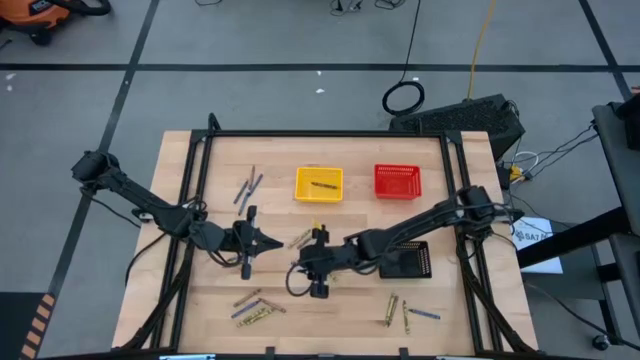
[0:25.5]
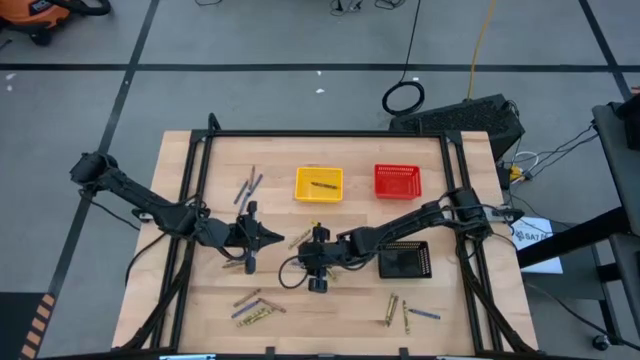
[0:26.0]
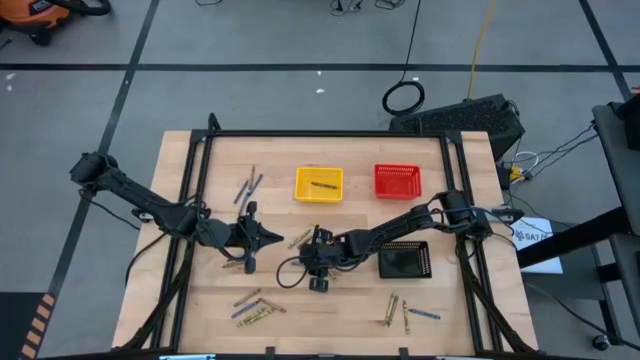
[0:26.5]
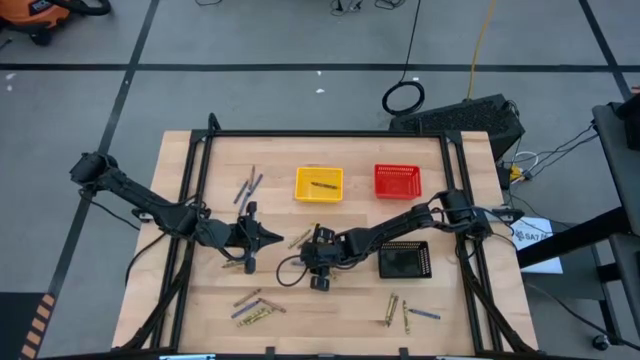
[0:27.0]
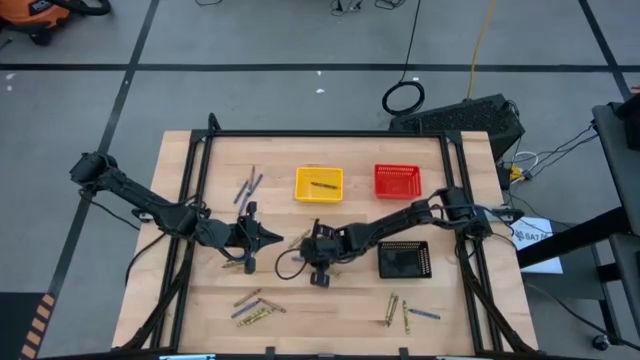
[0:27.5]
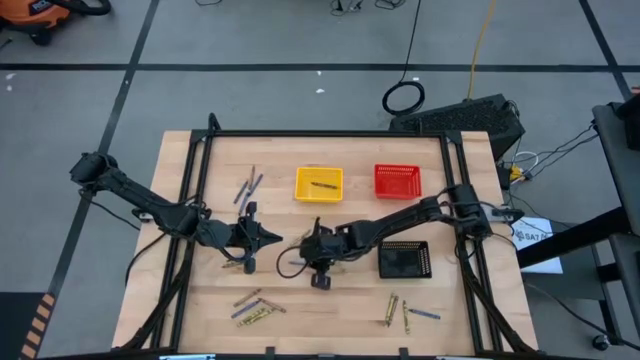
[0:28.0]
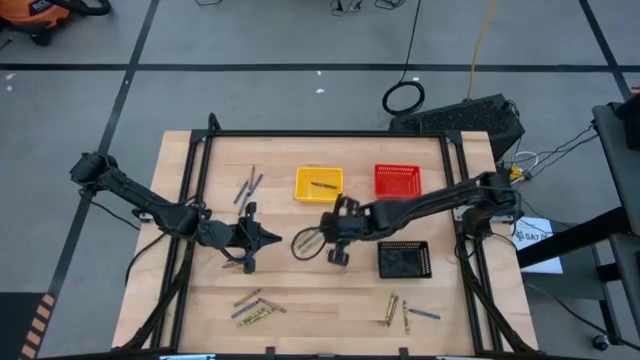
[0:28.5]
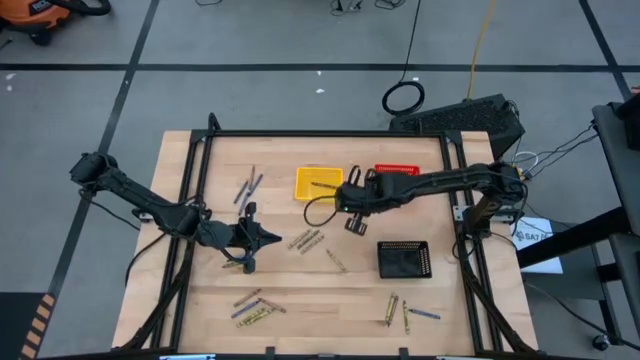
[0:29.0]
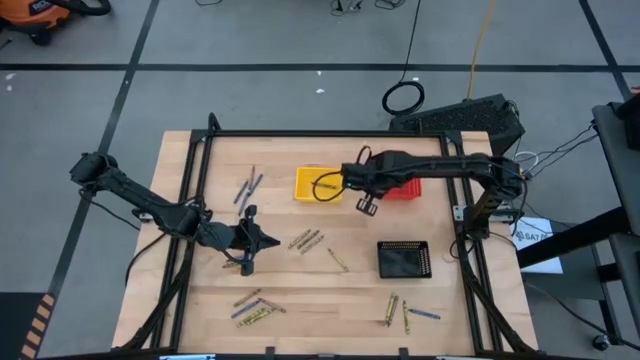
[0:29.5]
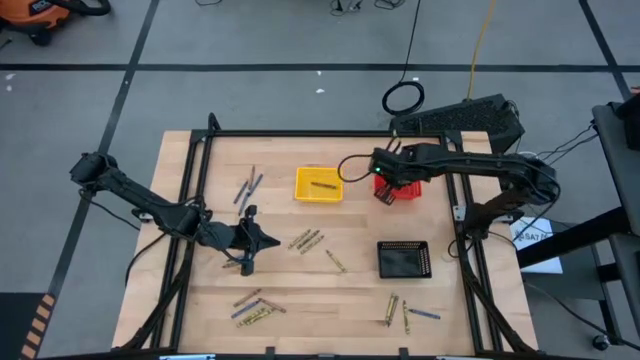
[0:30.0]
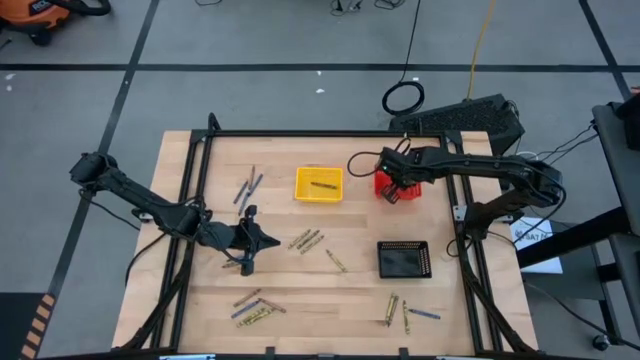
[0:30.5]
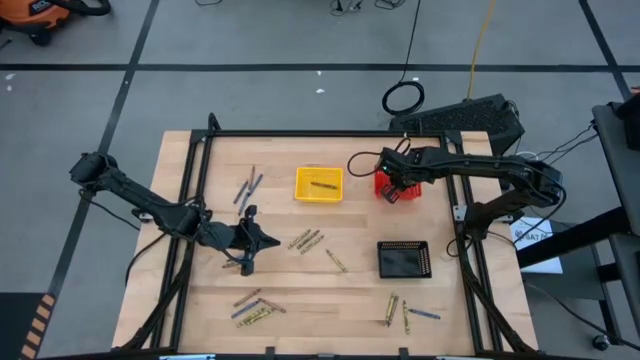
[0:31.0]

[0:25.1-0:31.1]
Task: Sort crayons
Put the blue crayon into the red bin

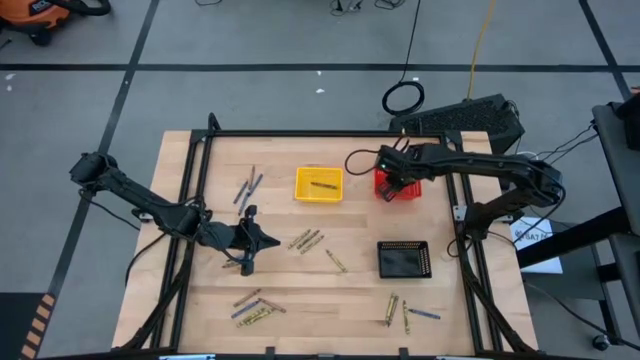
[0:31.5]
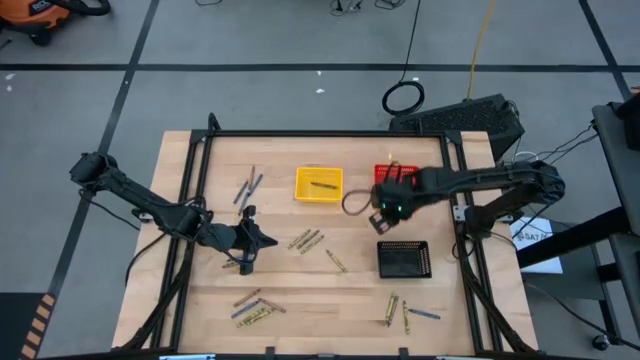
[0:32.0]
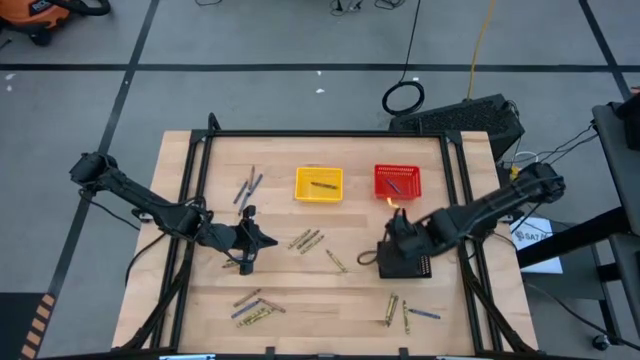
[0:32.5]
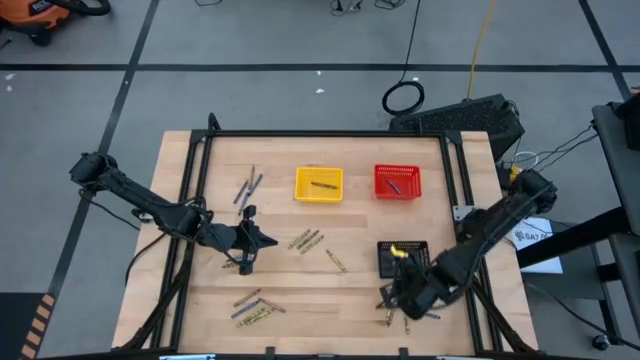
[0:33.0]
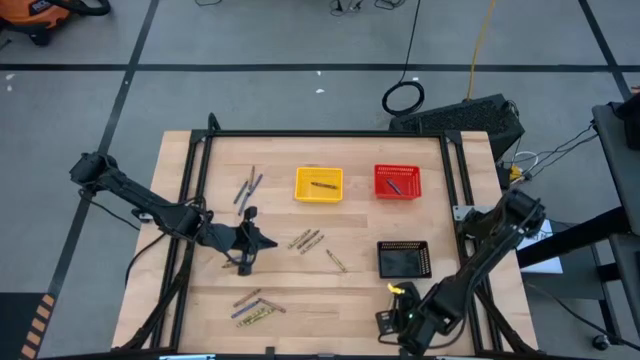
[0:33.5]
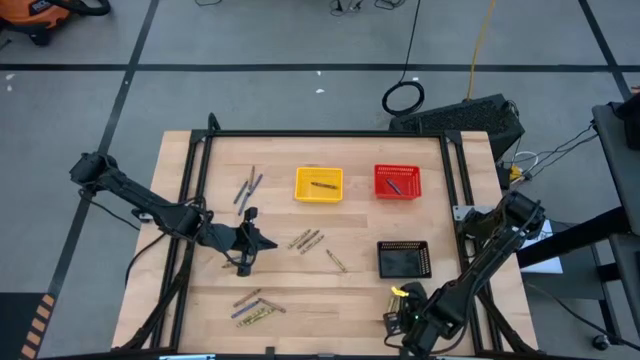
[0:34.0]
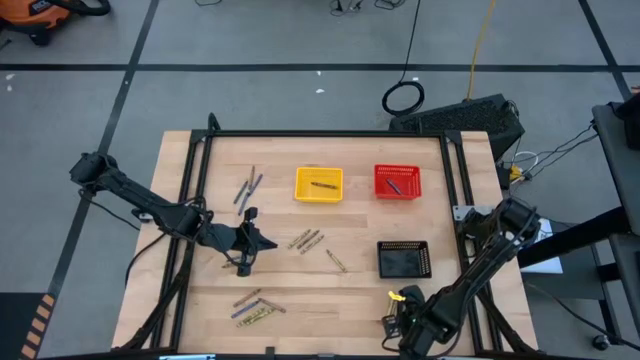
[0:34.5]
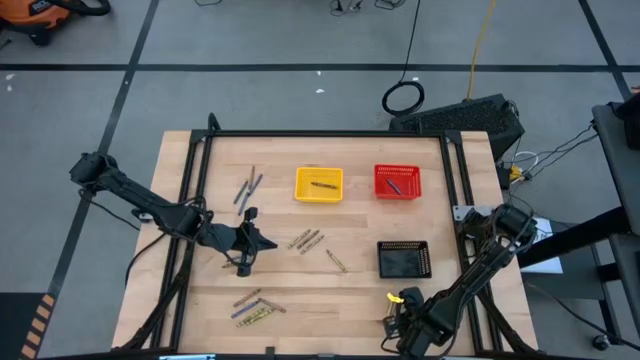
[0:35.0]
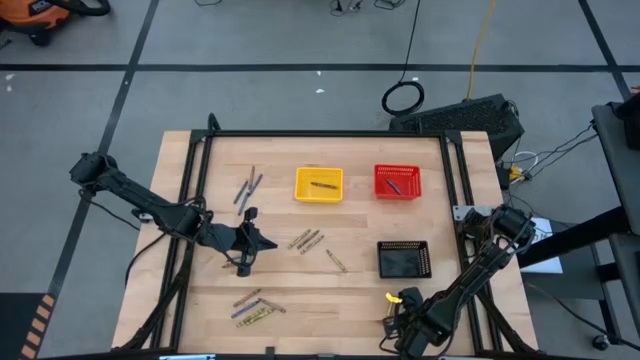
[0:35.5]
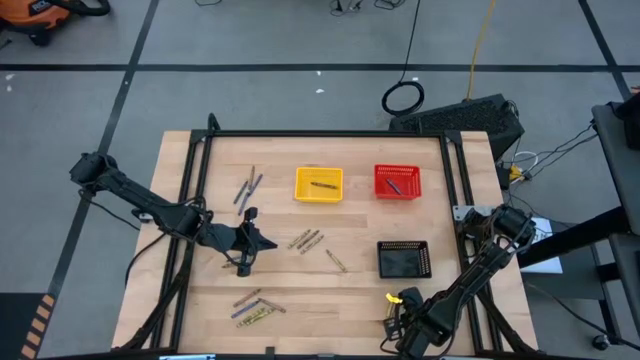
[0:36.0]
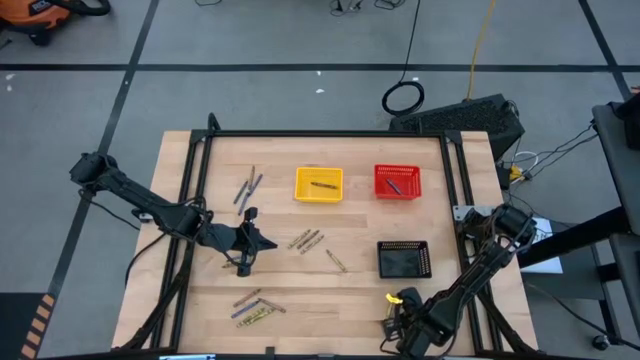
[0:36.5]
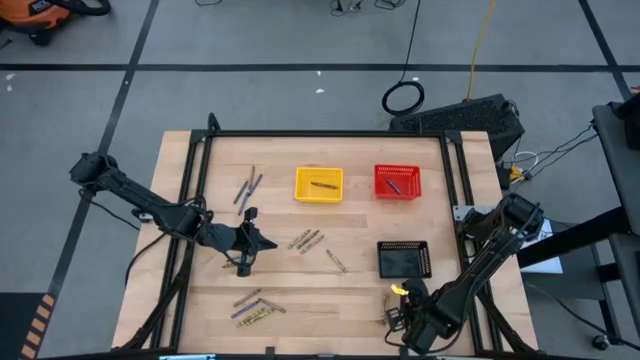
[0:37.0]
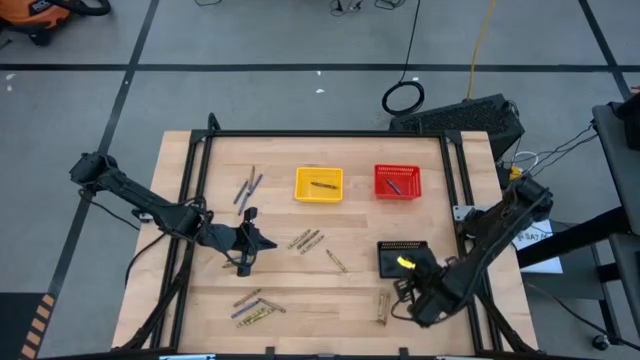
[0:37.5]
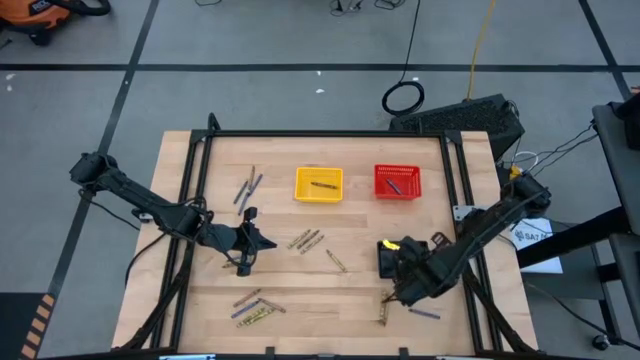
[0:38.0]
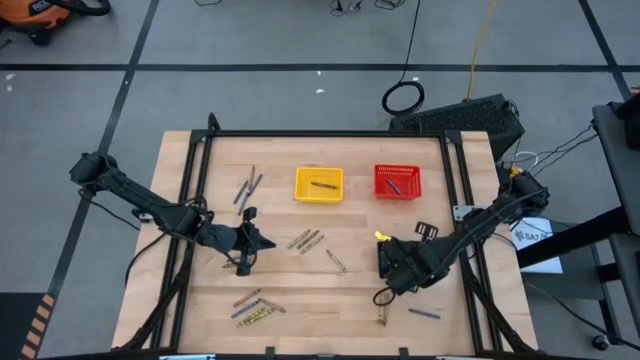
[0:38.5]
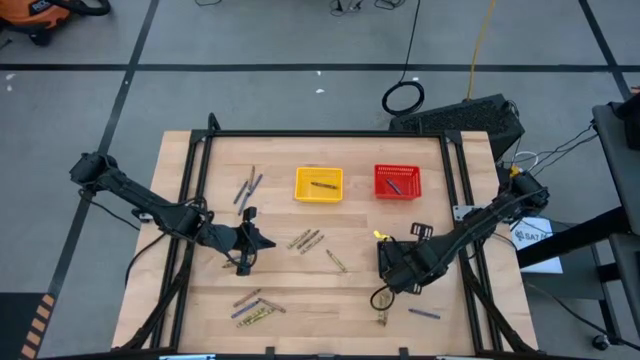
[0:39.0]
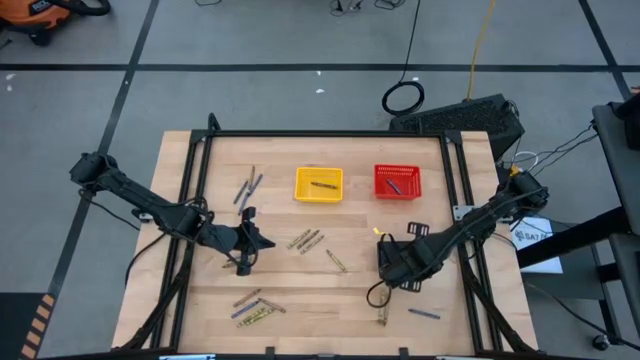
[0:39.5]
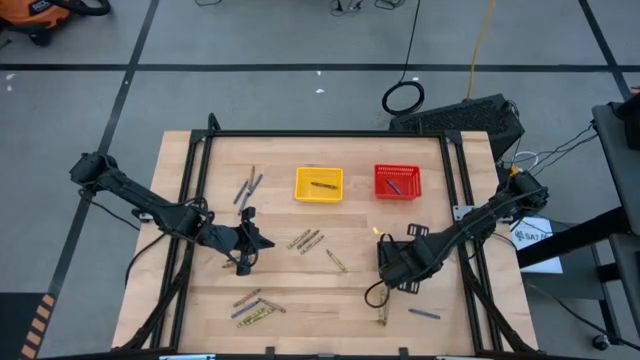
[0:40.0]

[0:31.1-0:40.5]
Put the green crayon into the black bin
